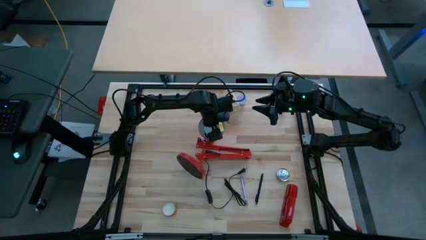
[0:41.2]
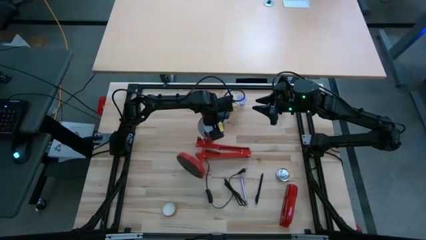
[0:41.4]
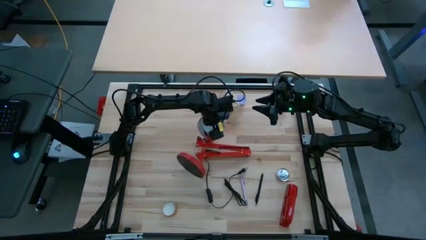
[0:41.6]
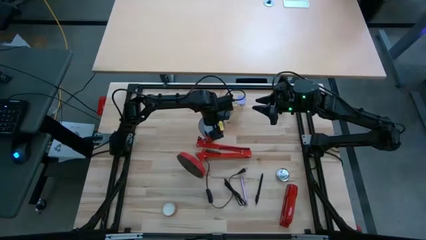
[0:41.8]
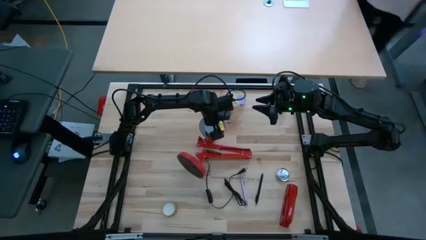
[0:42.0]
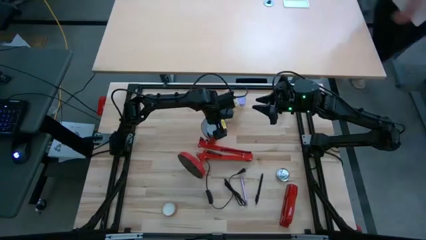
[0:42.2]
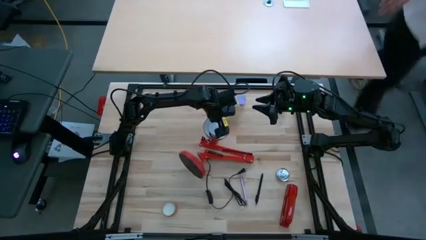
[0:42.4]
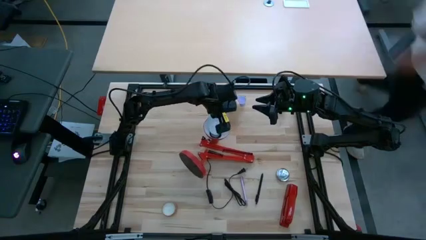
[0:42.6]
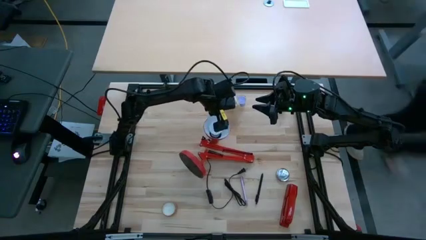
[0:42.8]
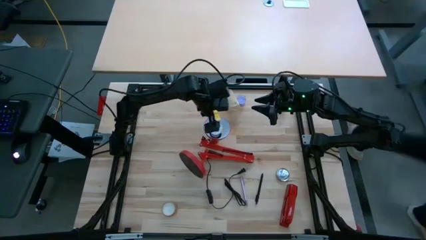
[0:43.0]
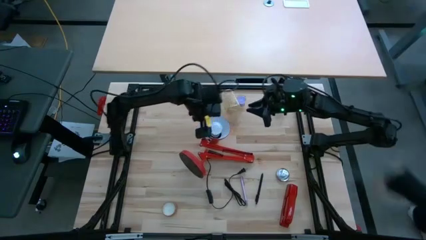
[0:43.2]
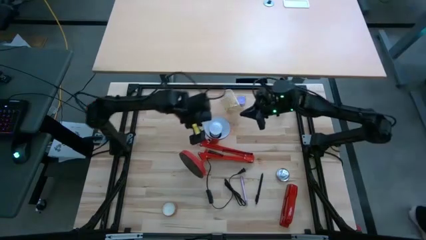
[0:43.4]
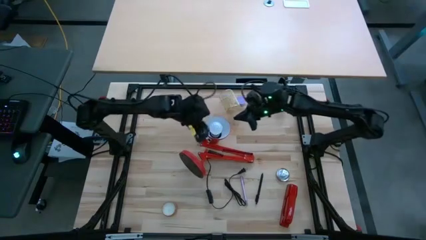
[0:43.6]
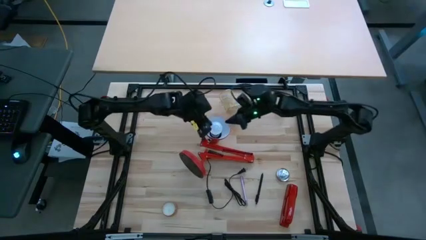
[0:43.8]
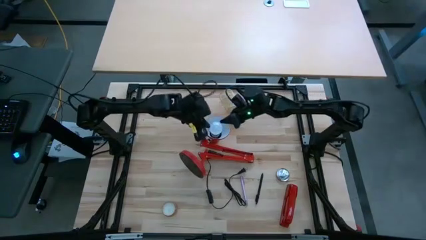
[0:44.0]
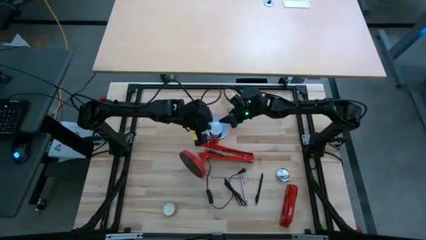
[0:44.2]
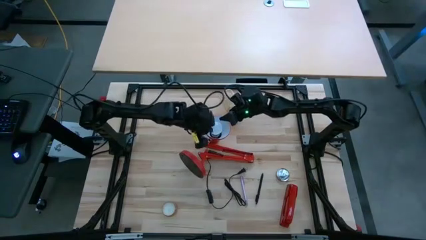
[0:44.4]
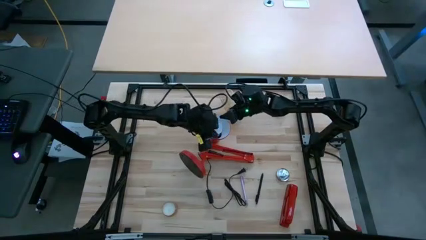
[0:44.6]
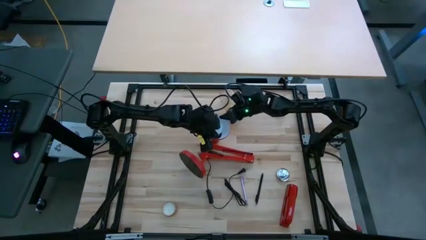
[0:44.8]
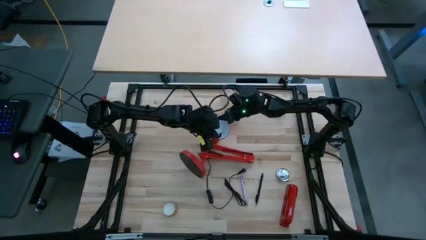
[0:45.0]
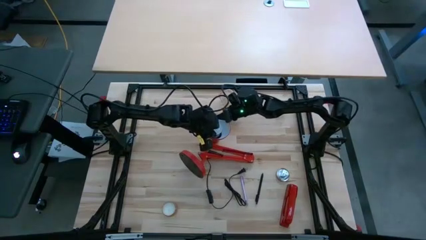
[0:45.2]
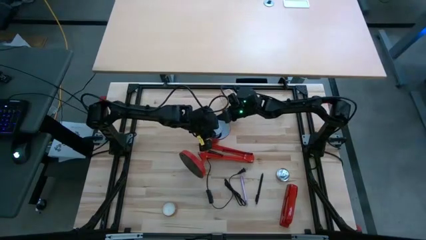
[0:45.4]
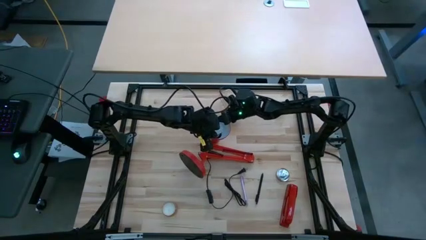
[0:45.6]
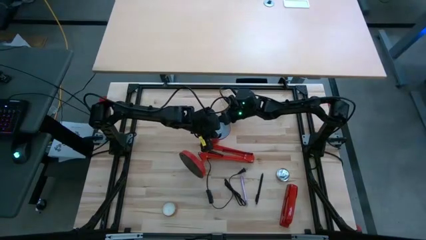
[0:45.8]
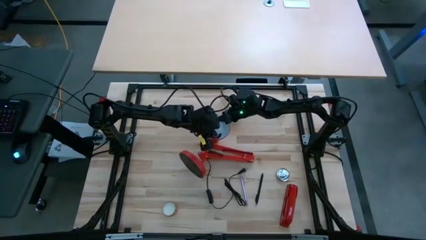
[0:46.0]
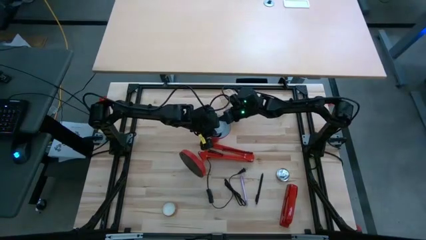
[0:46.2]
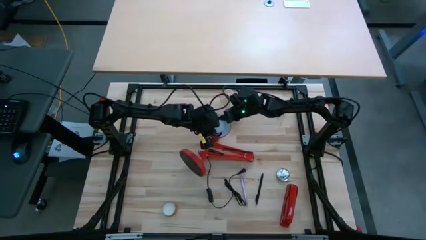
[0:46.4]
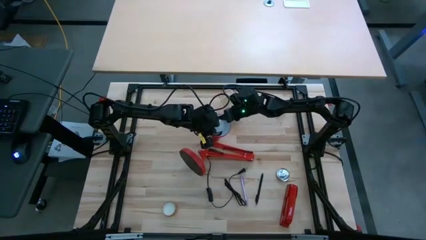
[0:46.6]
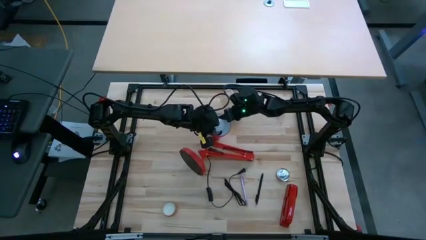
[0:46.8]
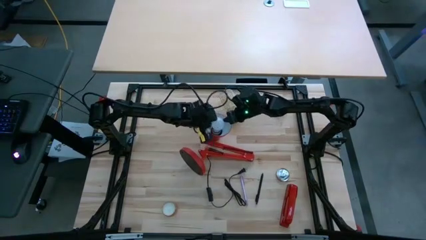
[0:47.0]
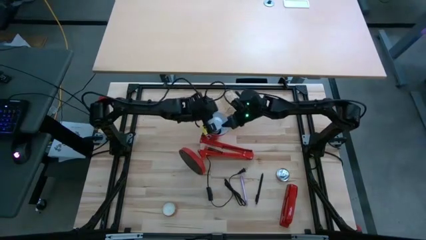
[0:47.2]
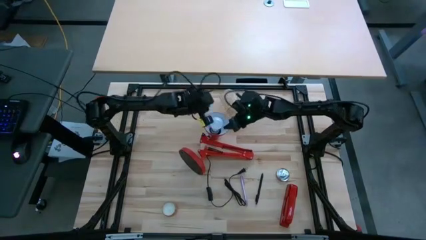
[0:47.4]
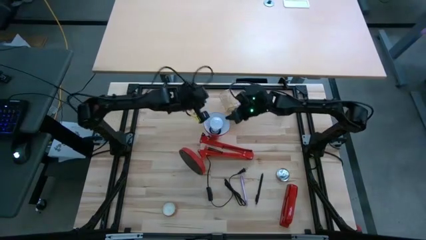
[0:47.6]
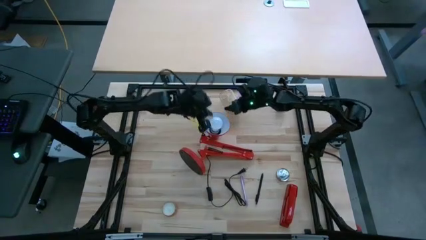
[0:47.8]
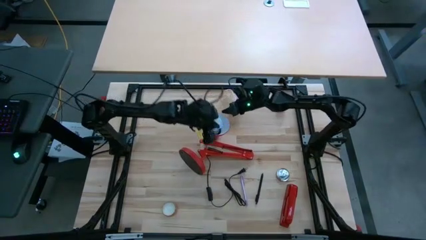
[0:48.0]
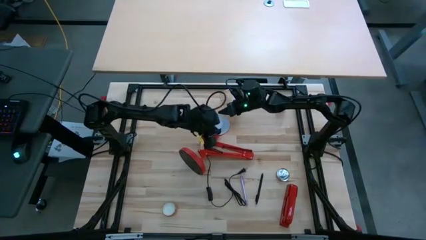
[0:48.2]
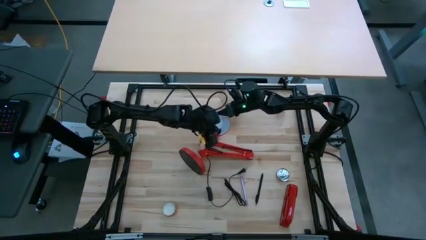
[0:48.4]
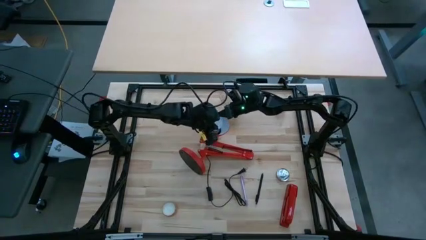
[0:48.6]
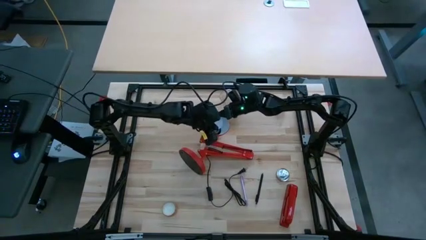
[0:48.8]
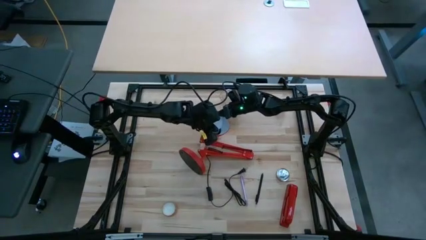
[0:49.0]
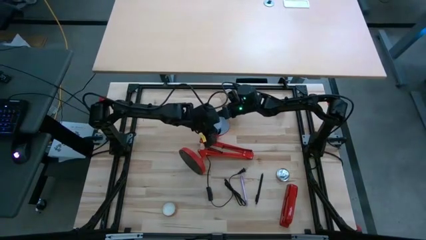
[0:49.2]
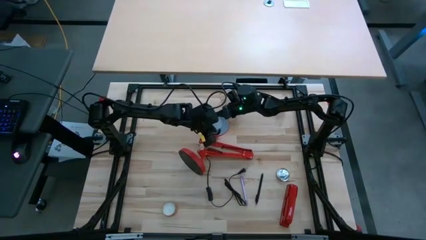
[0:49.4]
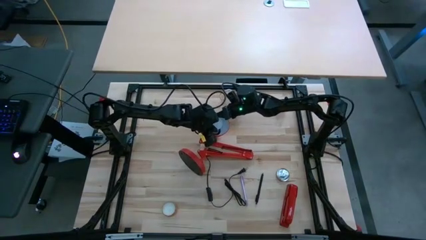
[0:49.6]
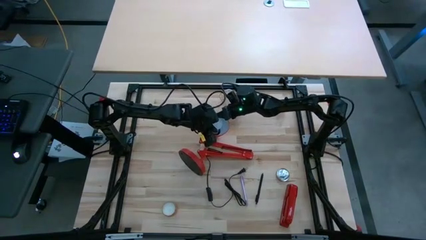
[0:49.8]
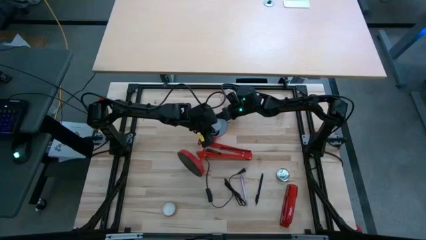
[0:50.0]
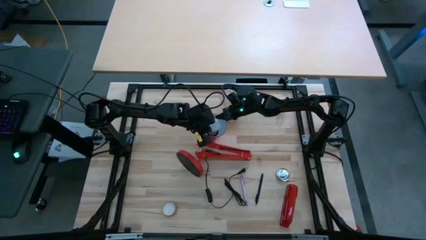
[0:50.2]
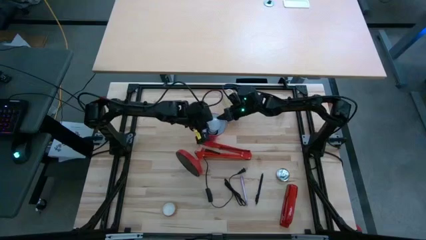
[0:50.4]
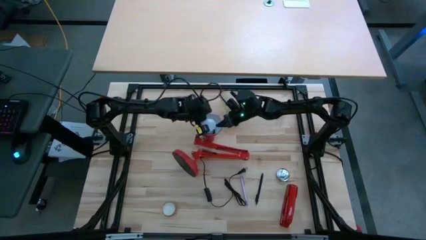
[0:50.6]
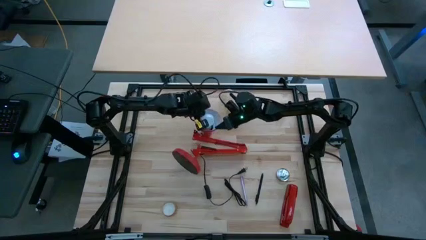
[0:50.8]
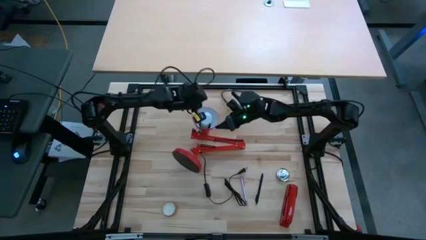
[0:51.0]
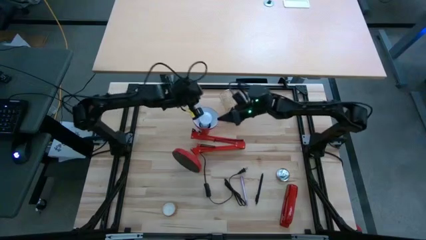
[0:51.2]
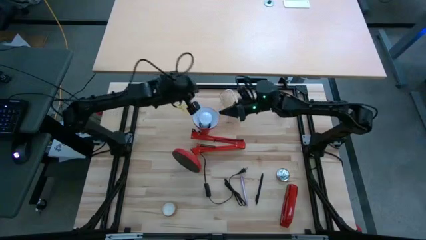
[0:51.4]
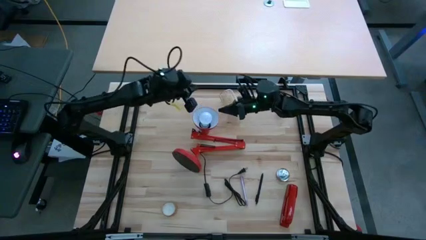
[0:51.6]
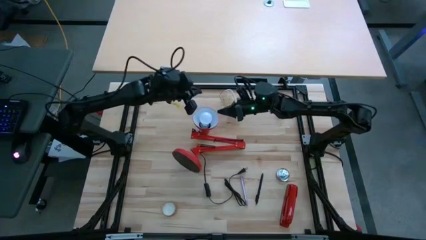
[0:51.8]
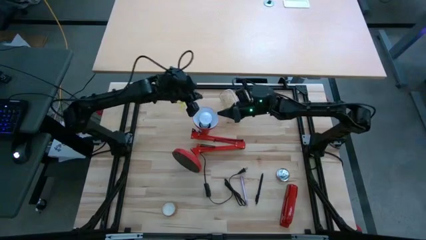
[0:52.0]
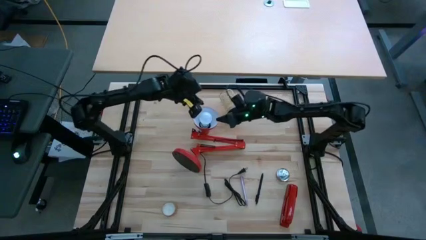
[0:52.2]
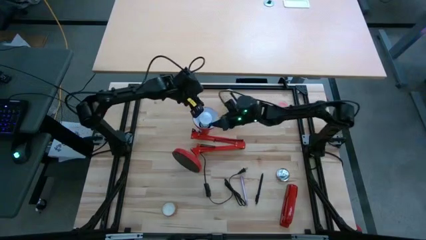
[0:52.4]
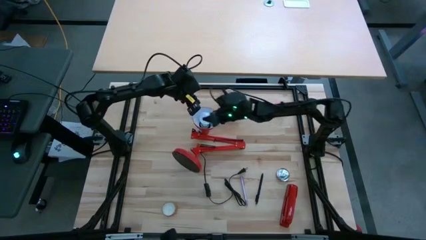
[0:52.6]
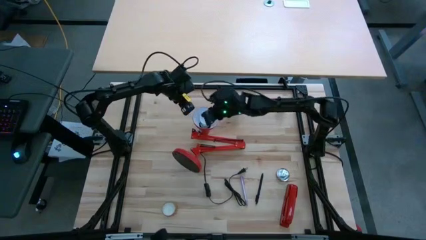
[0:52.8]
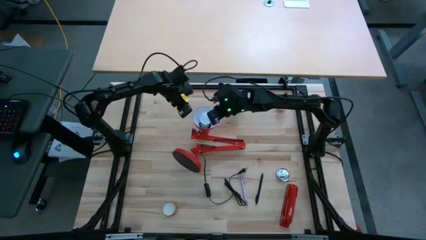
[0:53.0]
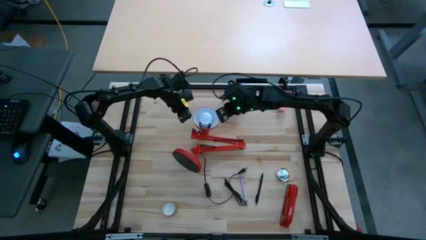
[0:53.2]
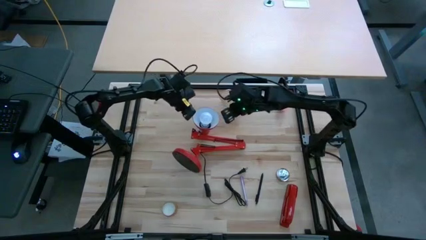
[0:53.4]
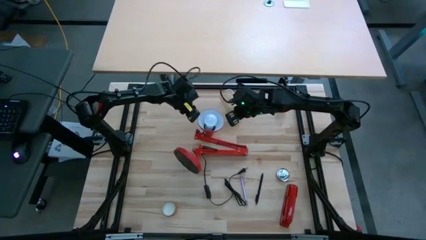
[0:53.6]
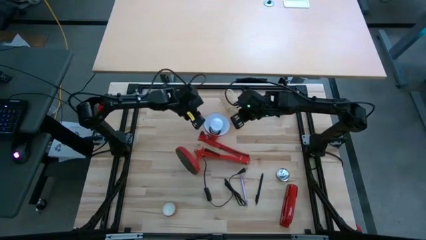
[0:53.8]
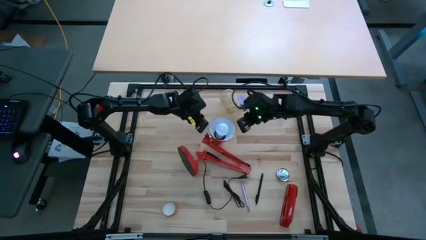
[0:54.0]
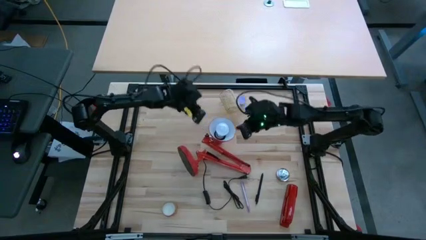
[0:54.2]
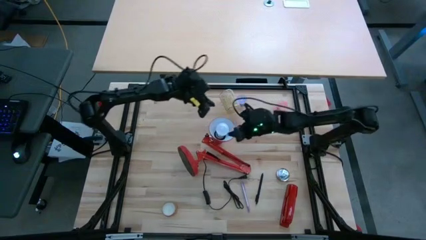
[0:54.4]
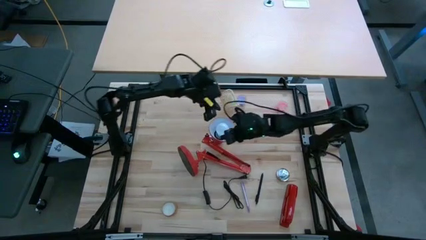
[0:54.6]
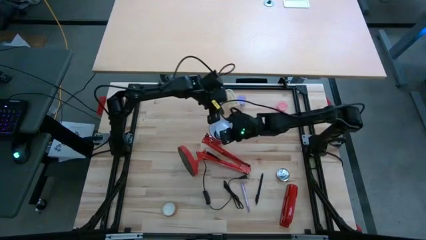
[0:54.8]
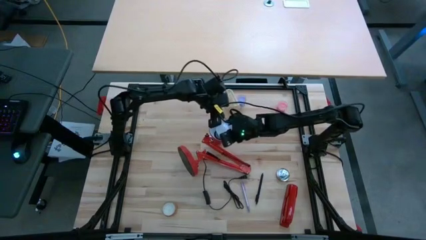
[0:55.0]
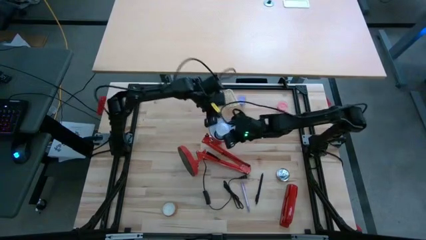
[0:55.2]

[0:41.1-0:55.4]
Task: Screw lightbulb
Insert the white lightbulb into the desk lamp
